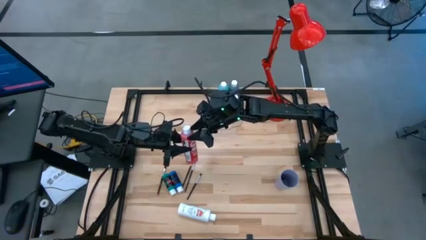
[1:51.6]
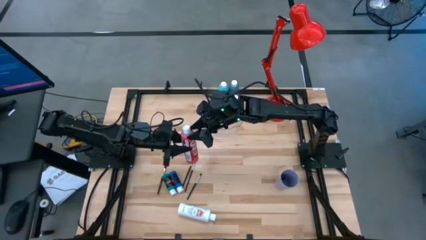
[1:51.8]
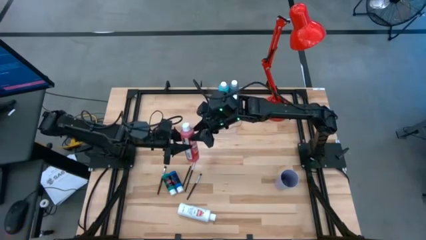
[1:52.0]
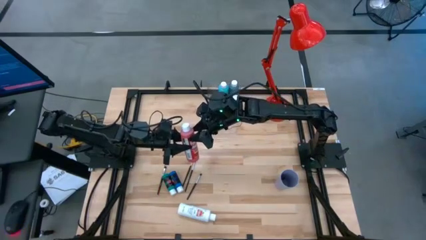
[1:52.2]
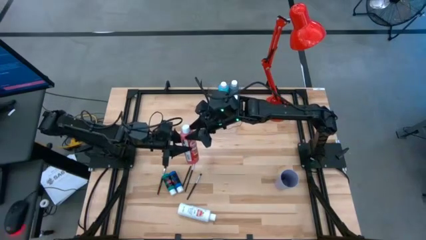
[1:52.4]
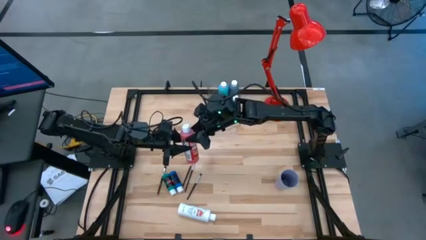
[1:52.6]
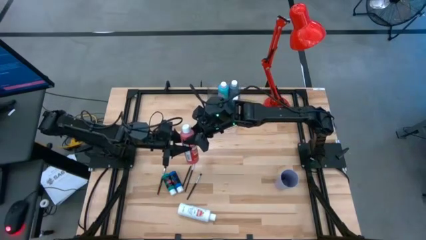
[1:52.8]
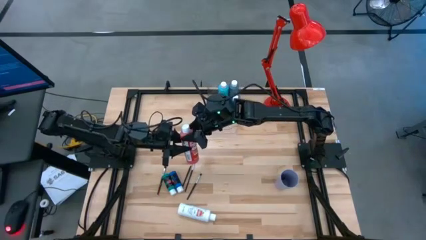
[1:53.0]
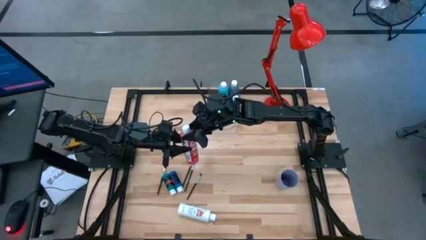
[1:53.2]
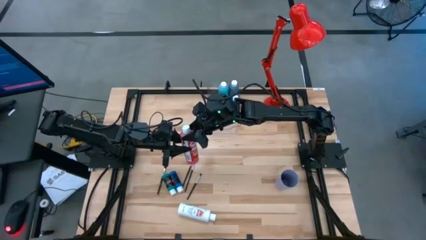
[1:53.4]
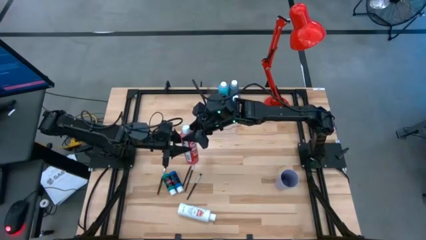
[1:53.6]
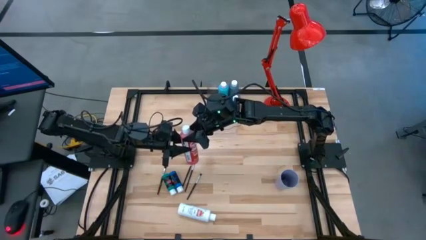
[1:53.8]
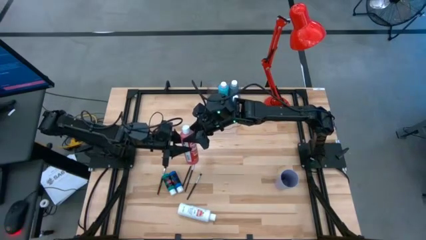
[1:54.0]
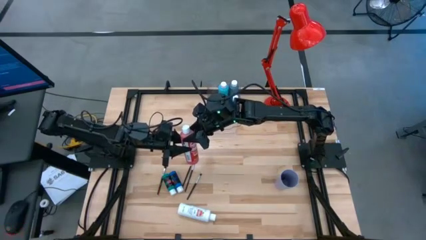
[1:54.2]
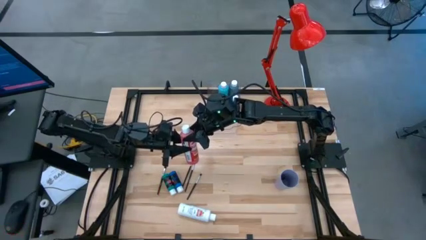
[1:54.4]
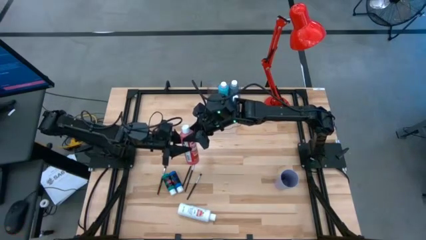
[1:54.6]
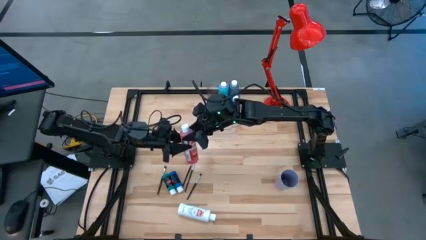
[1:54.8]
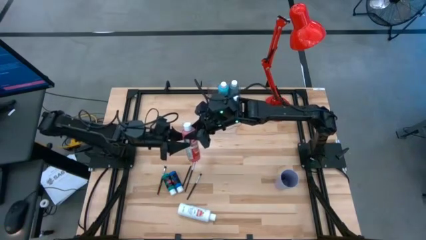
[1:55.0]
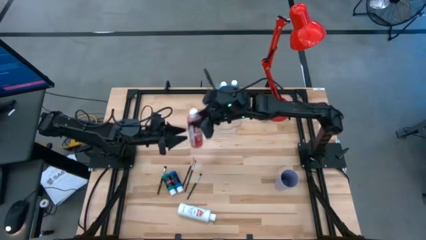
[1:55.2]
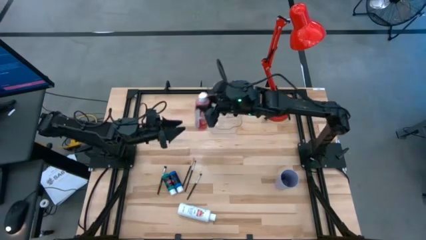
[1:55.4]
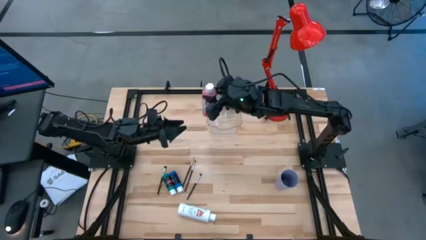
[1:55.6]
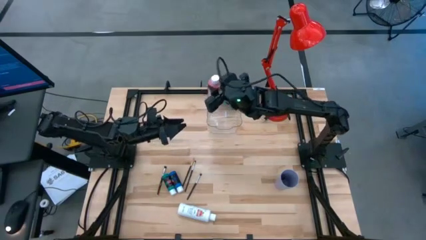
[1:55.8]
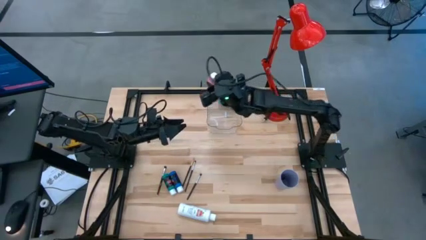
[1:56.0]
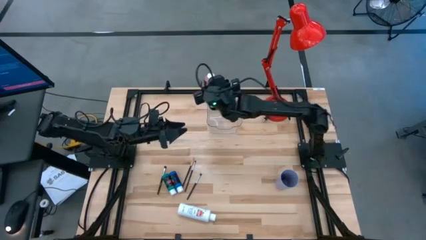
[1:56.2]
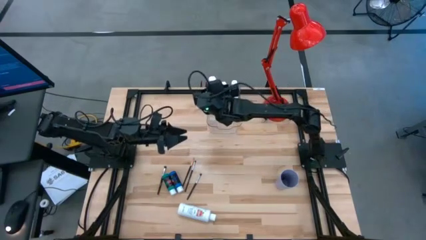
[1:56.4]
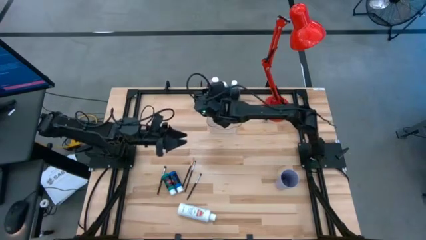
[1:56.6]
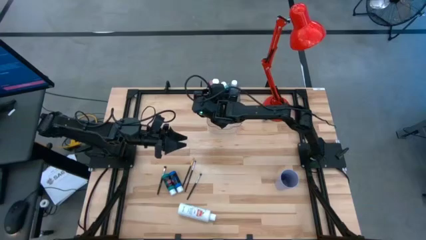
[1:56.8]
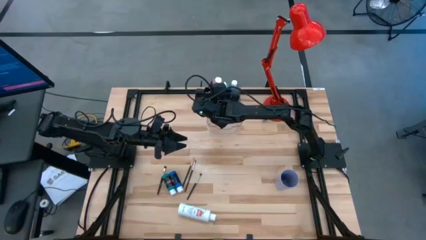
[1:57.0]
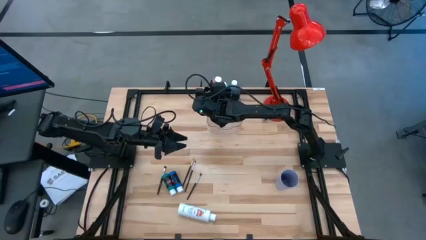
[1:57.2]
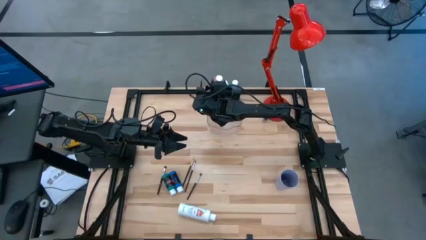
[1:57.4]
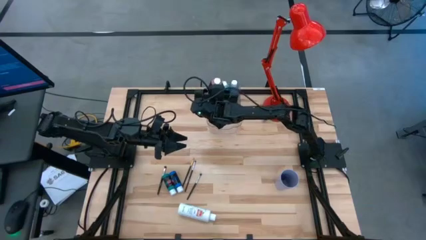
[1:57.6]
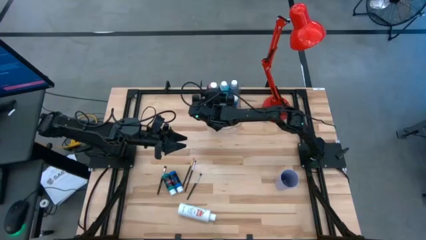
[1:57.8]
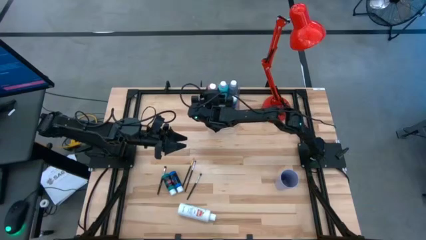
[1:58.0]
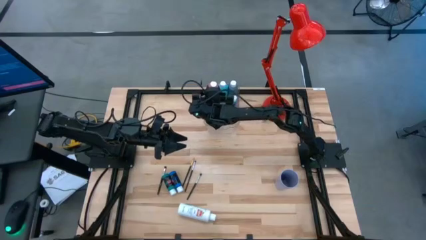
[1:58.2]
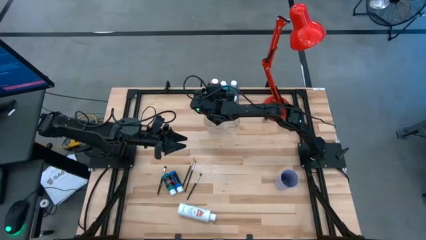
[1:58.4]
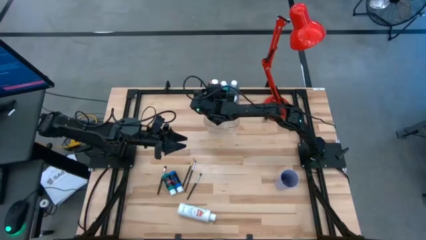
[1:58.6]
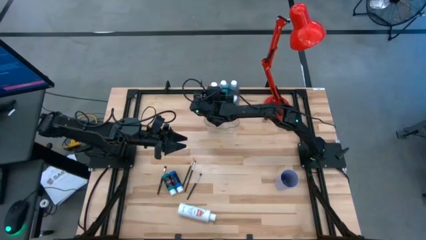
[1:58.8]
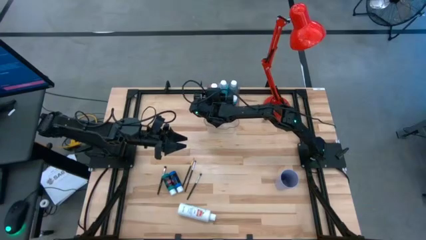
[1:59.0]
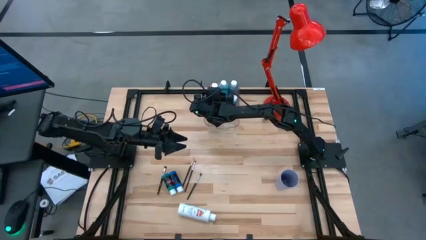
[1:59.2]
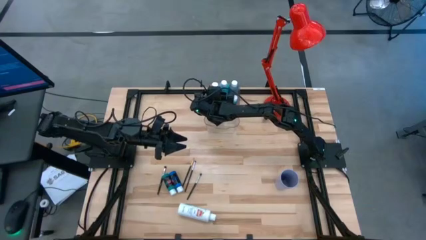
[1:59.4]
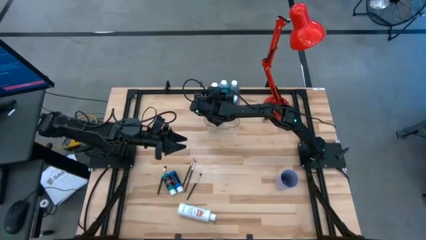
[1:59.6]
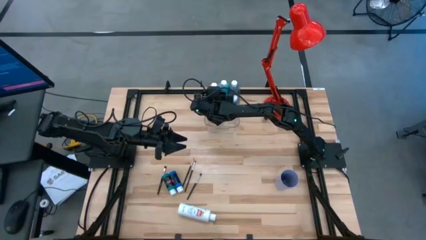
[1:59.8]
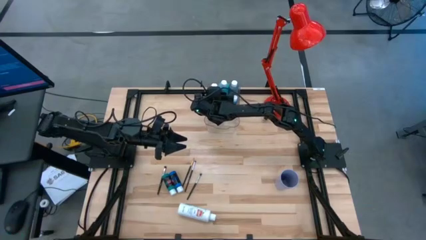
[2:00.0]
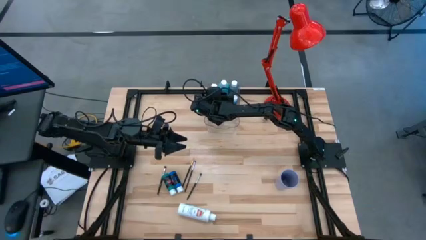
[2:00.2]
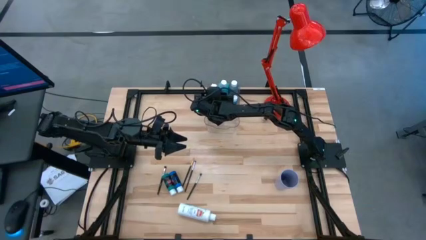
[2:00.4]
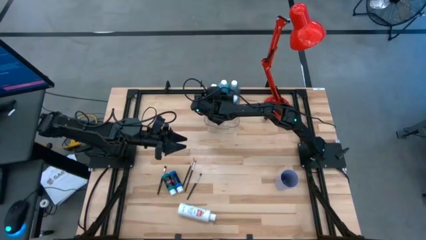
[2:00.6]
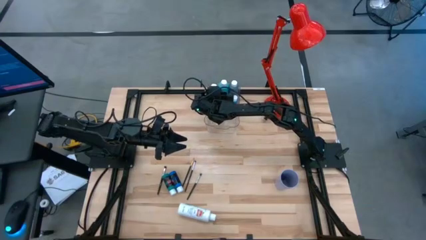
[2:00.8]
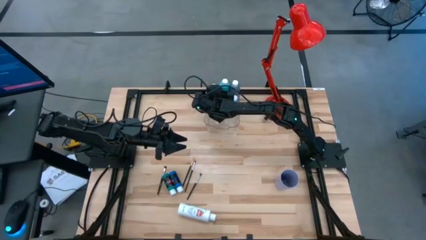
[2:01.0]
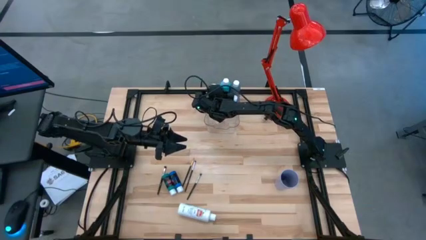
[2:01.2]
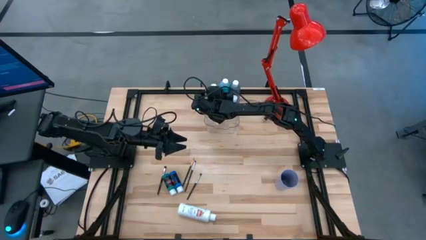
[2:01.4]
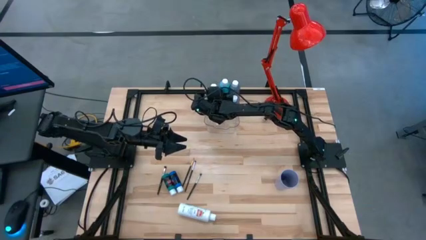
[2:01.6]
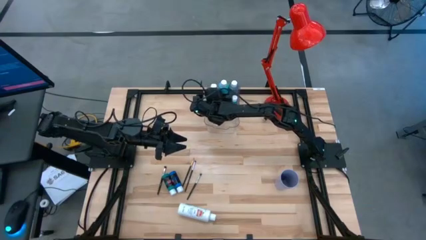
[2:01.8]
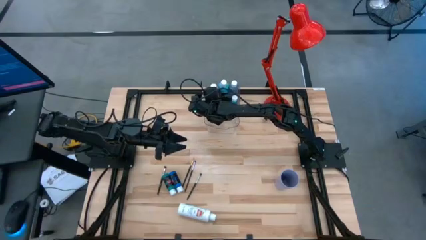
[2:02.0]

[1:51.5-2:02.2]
Task: Pick & Place Paint Supplies
Put the red paint bottle into the transparent bin

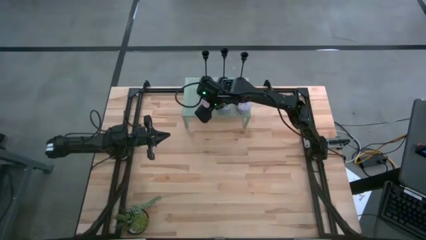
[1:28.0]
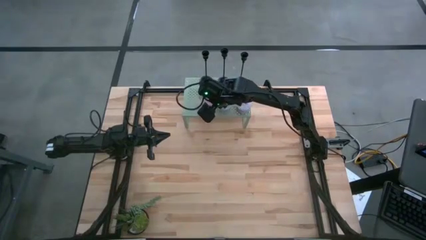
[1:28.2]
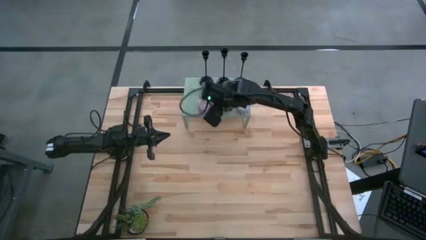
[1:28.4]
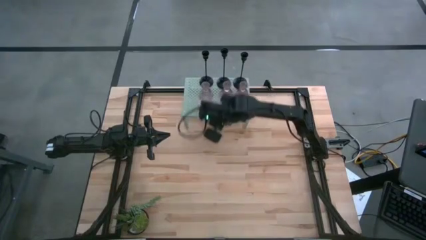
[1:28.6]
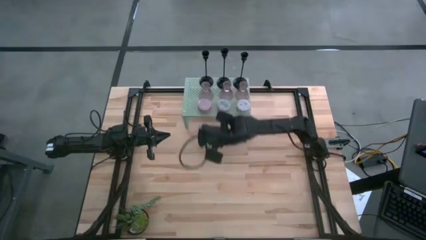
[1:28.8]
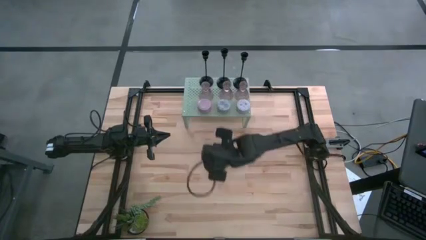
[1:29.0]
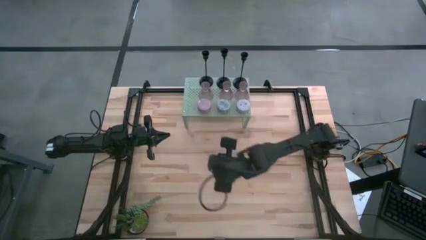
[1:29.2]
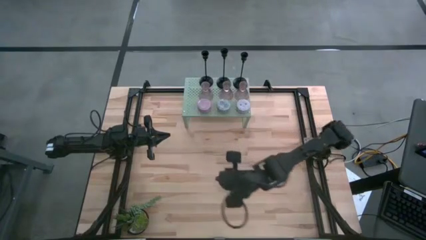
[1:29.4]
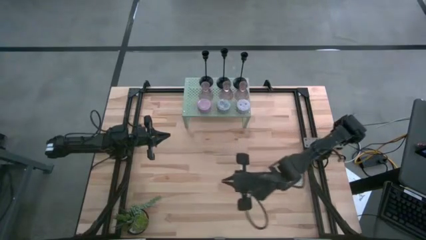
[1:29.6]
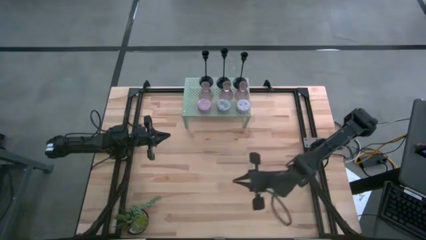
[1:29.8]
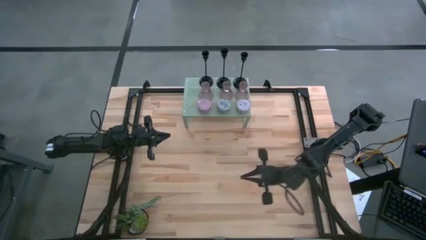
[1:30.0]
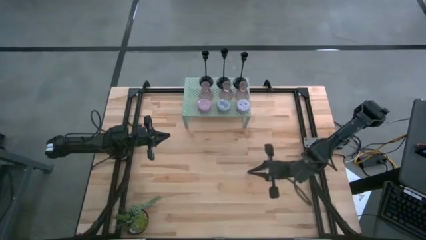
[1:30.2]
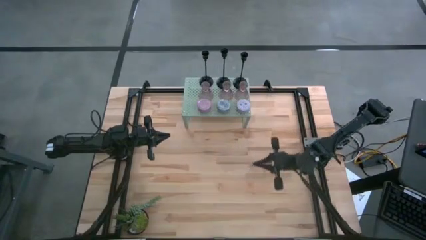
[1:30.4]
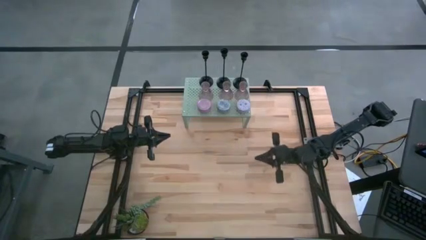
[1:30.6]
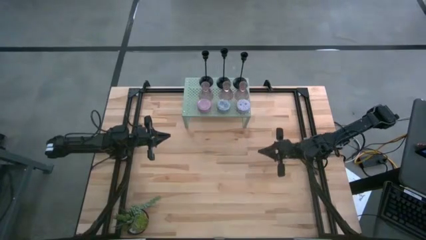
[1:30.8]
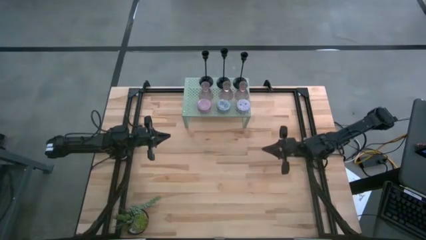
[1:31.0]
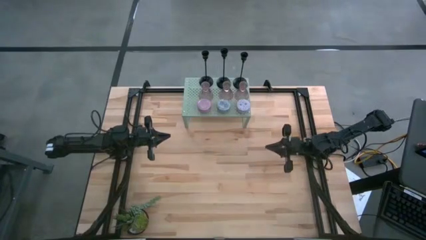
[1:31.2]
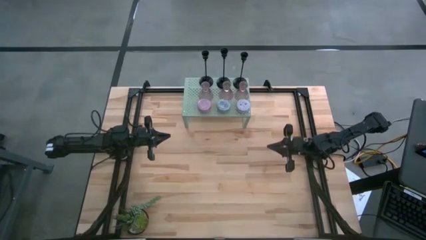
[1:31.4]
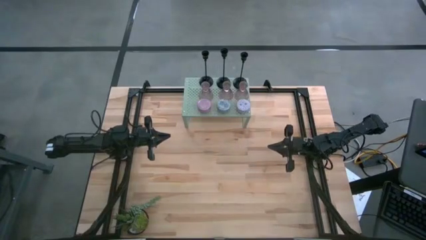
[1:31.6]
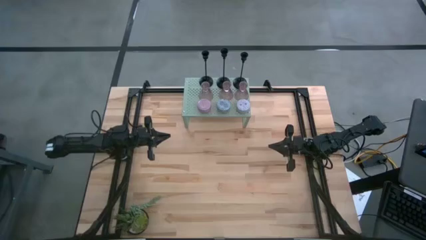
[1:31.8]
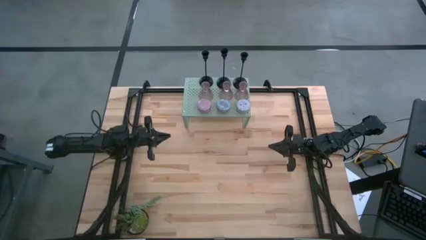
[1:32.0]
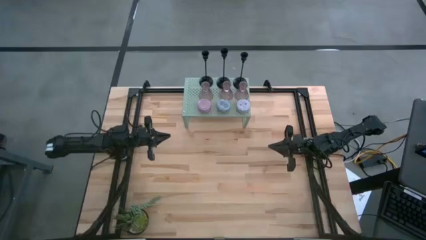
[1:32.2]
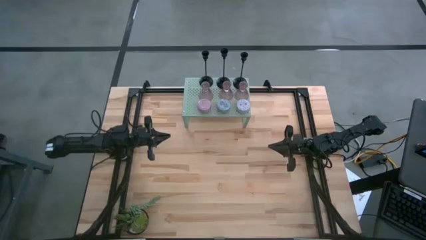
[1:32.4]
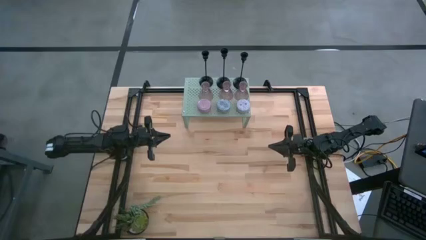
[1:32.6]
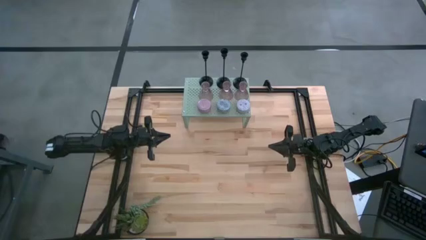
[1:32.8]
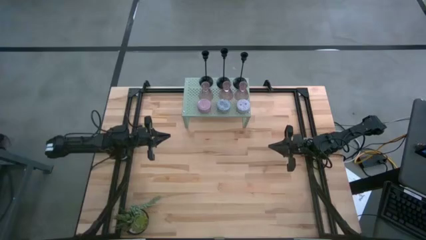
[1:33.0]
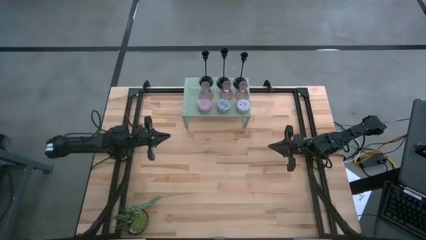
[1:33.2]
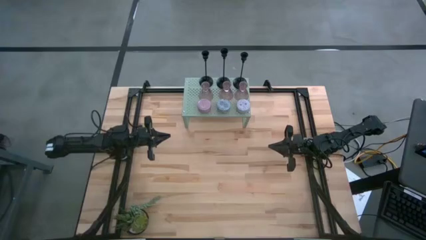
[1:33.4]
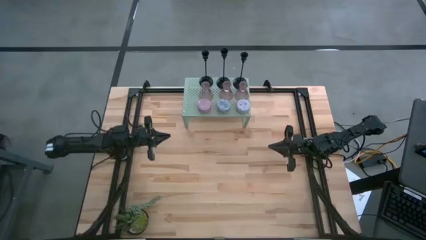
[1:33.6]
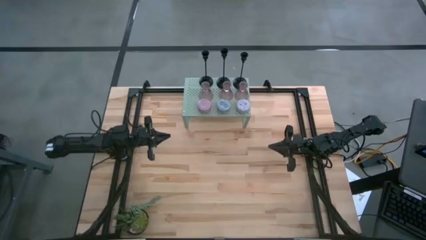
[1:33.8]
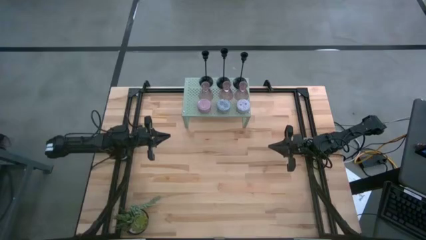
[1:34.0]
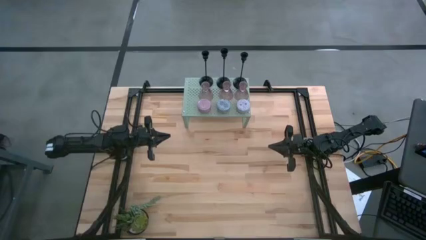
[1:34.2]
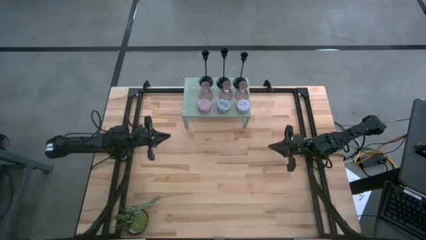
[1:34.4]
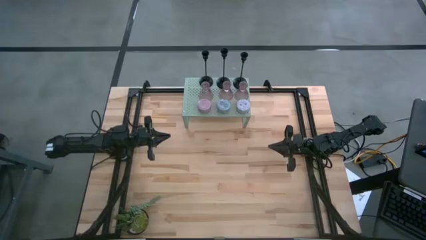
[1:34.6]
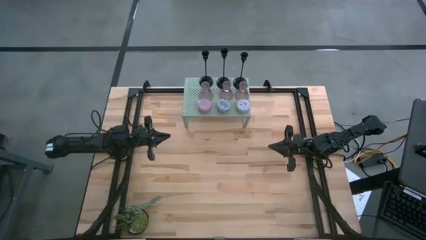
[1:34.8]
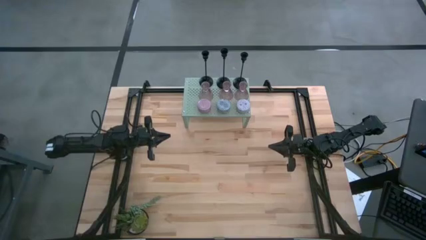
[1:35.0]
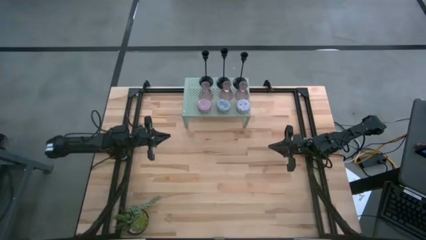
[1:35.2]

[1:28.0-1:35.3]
Task: Pick & Place candle stick holders
Return to Home Position
